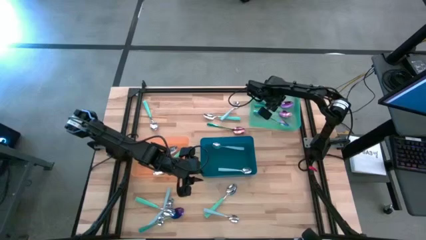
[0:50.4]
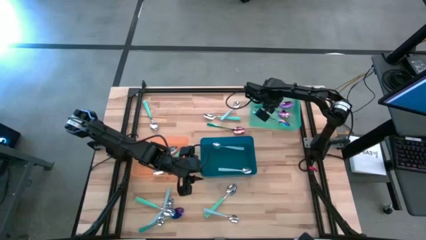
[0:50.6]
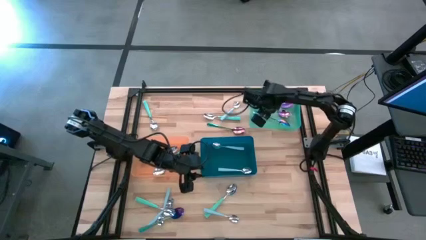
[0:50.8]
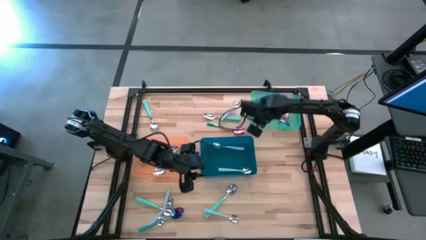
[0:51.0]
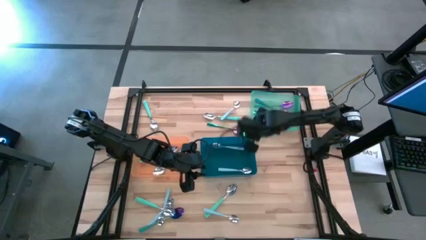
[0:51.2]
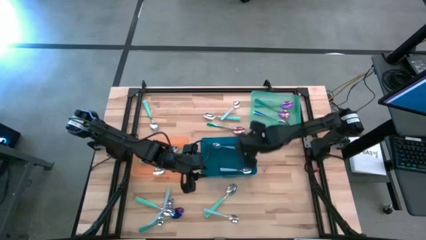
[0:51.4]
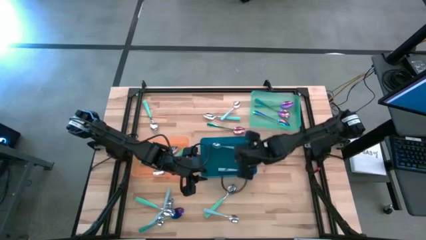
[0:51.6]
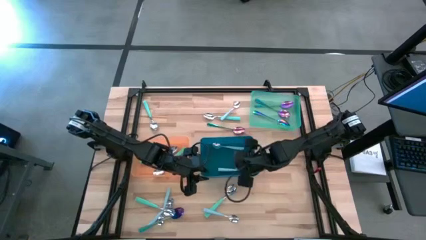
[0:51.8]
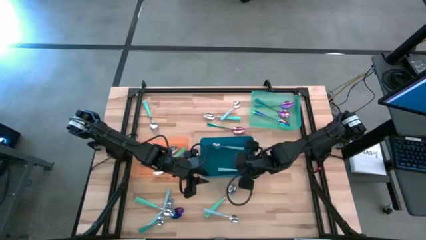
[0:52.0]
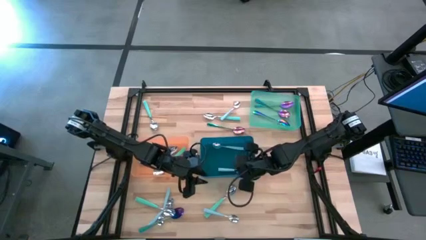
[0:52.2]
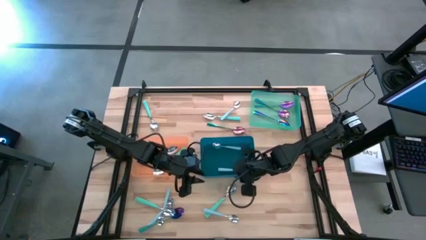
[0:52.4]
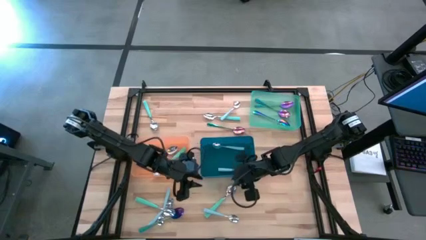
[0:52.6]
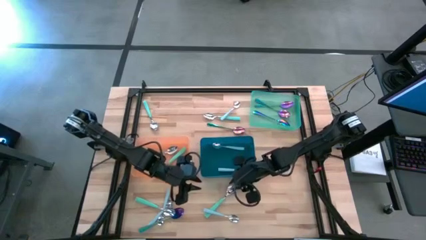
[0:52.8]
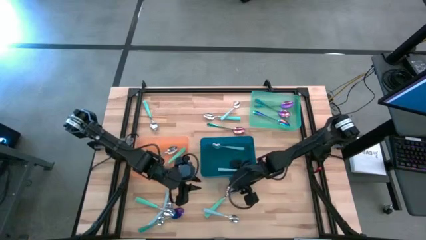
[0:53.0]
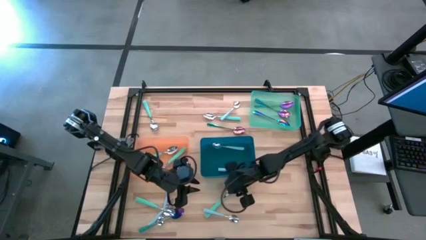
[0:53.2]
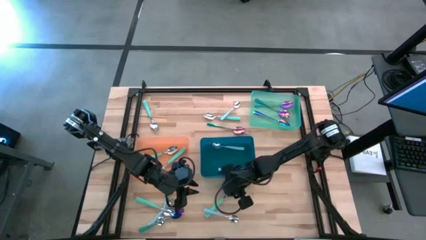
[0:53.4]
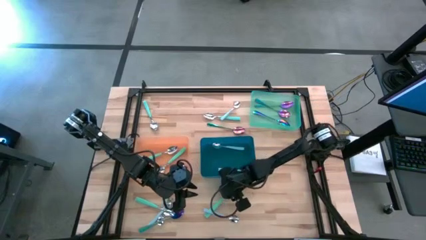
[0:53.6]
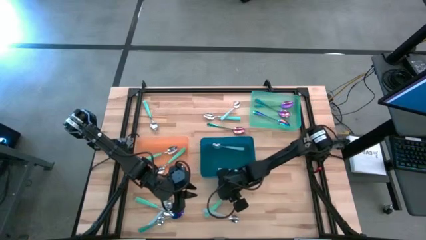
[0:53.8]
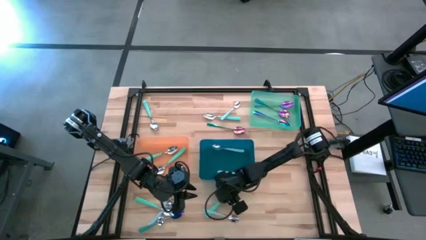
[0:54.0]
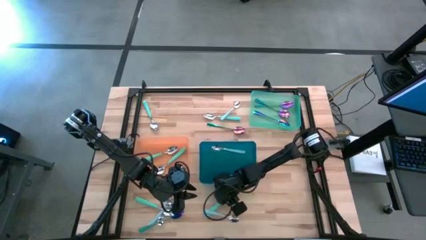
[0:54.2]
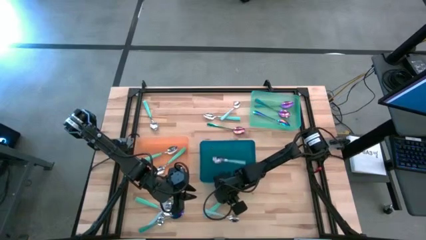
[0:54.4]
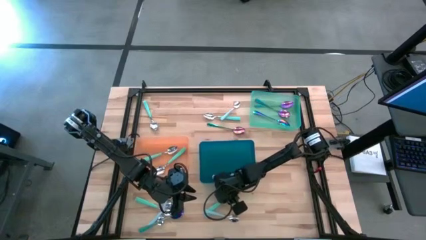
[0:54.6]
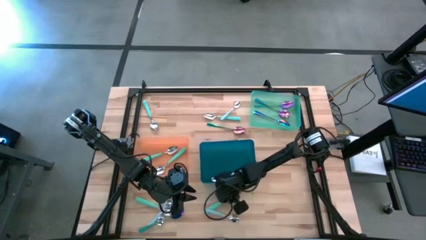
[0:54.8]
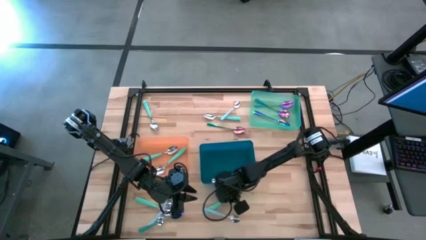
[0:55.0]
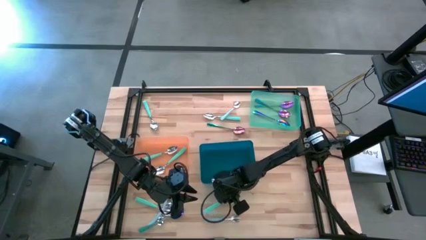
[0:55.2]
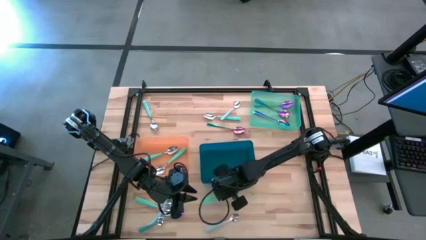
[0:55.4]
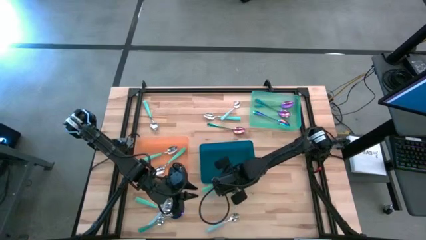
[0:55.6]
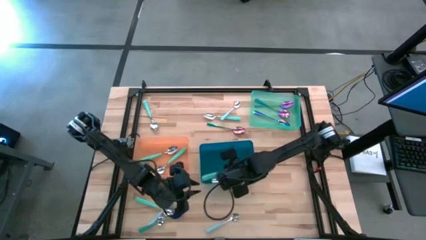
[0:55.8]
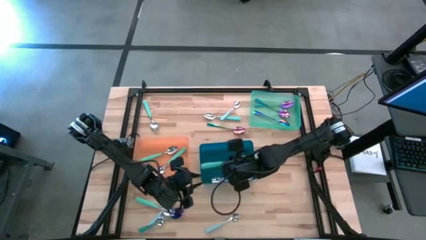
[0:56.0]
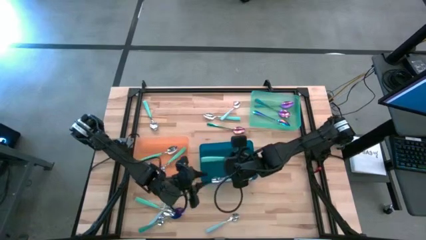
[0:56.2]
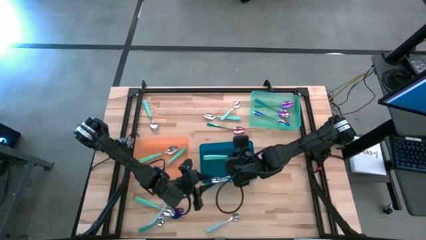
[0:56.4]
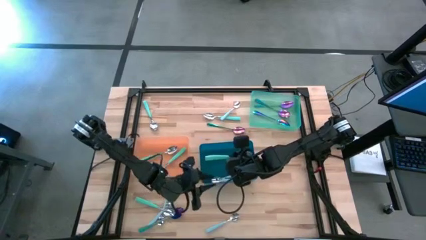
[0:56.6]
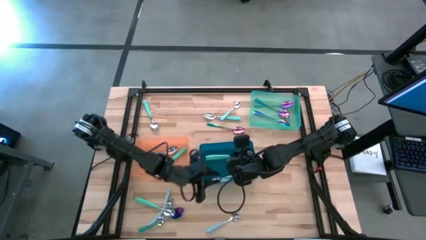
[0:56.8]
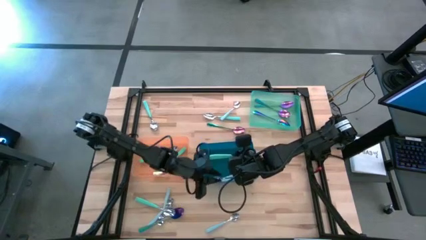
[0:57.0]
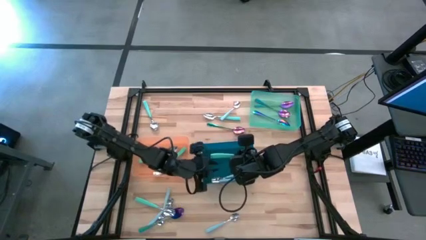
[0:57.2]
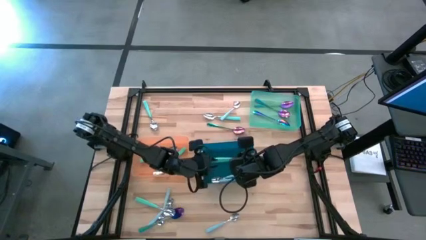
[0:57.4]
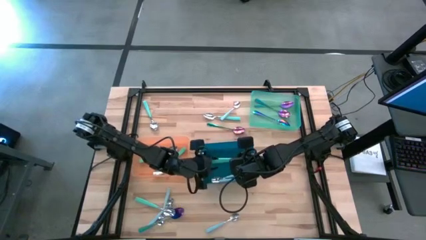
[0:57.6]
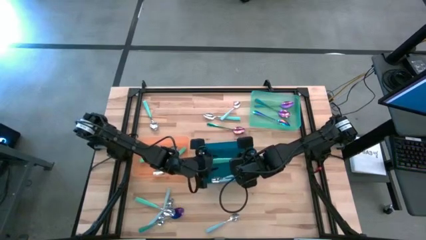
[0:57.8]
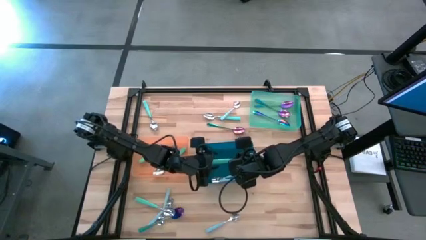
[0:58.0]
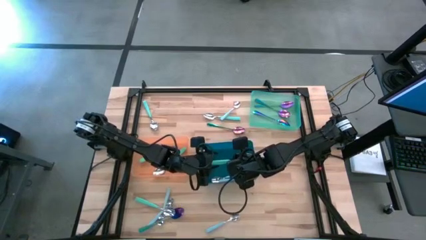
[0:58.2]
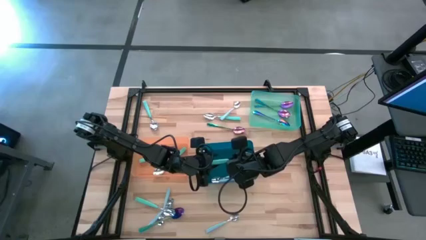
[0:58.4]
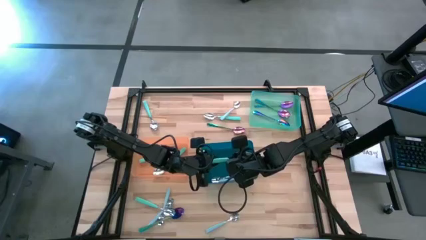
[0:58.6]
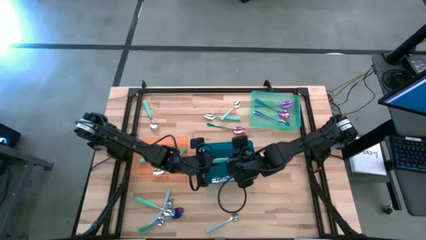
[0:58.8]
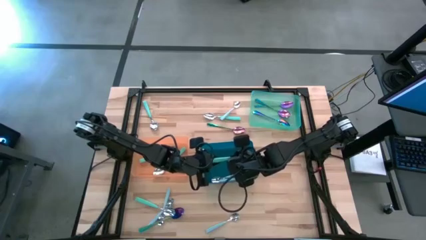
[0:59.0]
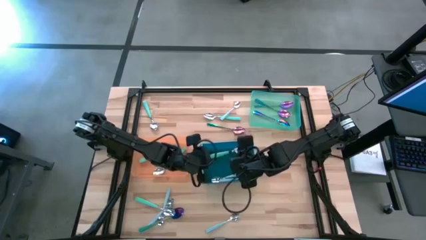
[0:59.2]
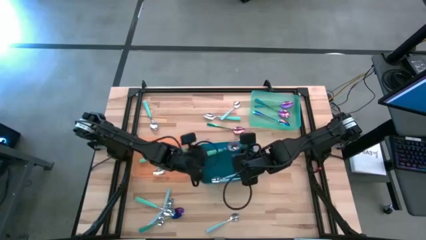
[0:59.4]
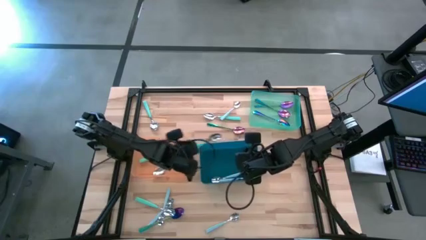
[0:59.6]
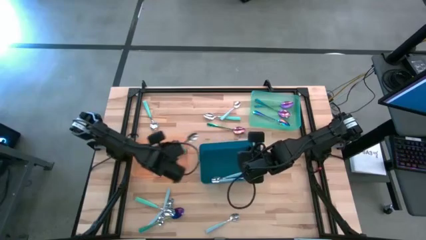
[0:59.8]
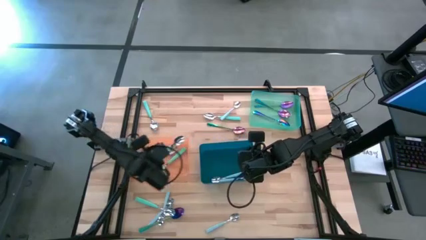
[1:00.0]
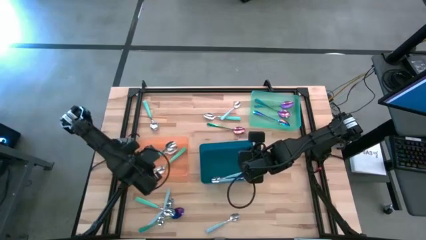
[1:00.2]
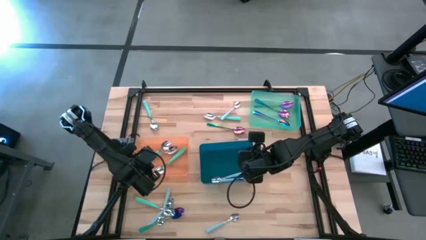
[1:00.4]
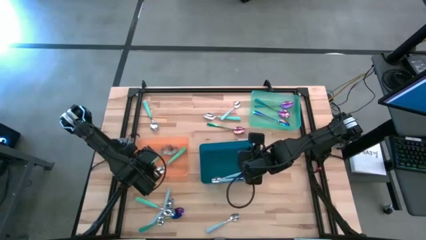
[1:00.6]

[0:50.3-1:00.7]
Task: Sort silverware by color (type)
Put the light green spoon into the orange bin

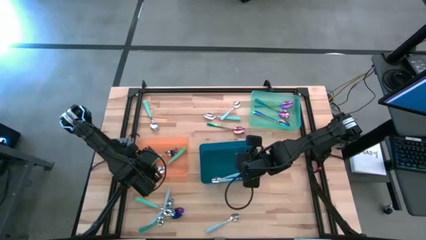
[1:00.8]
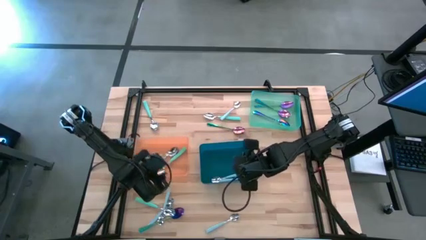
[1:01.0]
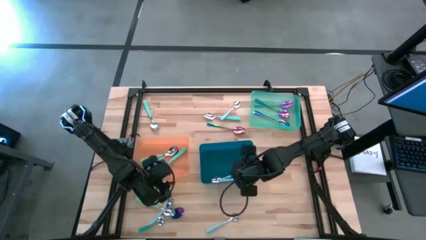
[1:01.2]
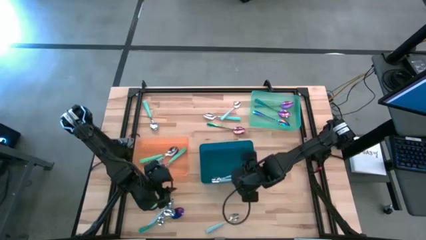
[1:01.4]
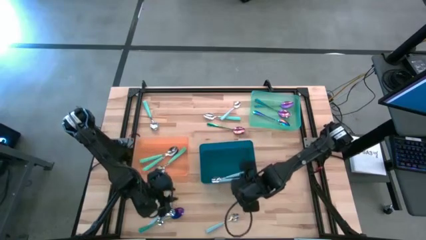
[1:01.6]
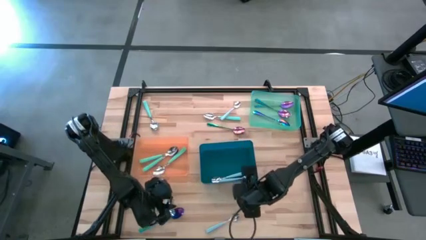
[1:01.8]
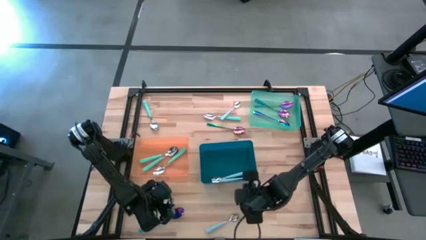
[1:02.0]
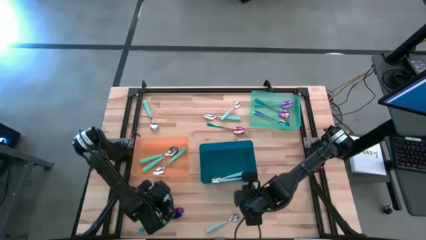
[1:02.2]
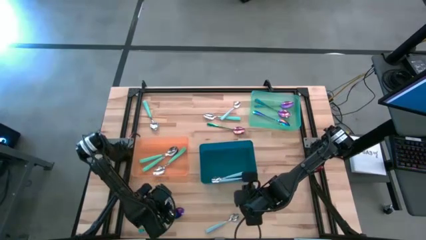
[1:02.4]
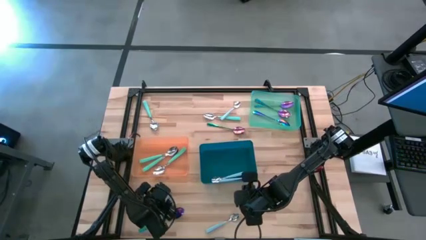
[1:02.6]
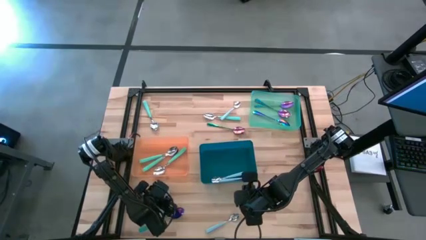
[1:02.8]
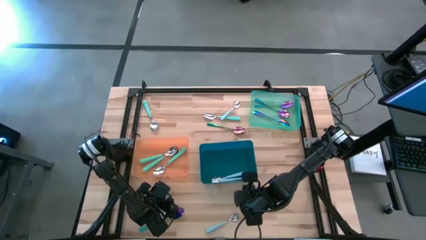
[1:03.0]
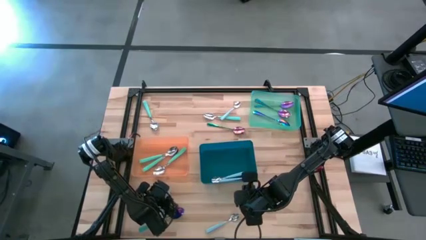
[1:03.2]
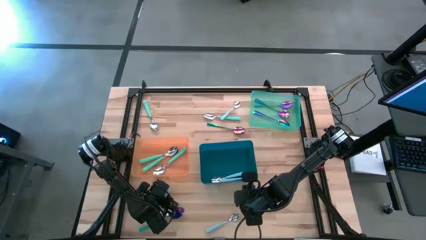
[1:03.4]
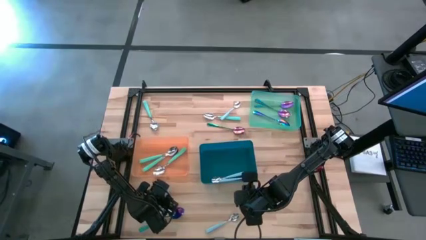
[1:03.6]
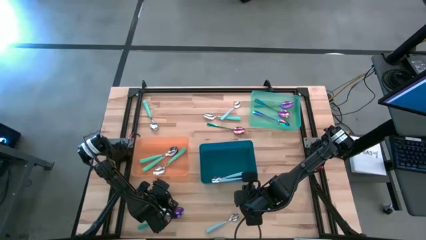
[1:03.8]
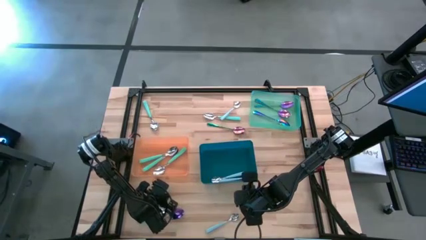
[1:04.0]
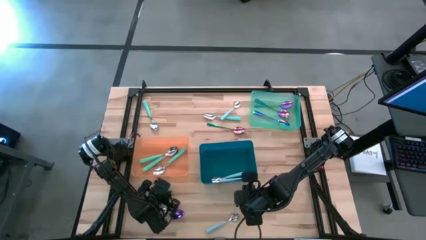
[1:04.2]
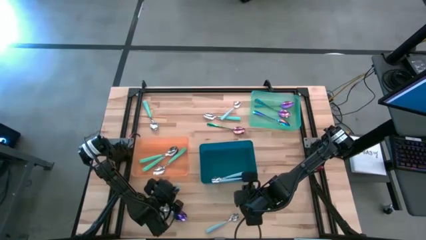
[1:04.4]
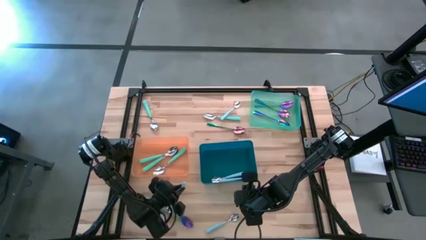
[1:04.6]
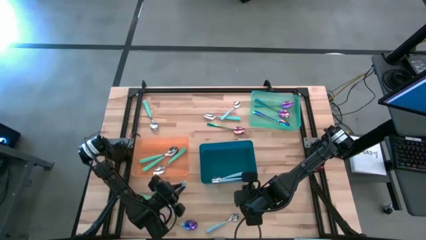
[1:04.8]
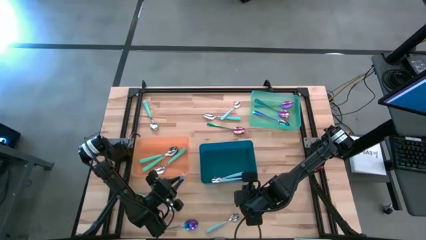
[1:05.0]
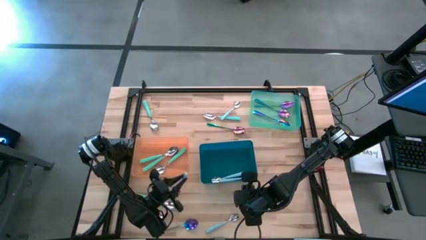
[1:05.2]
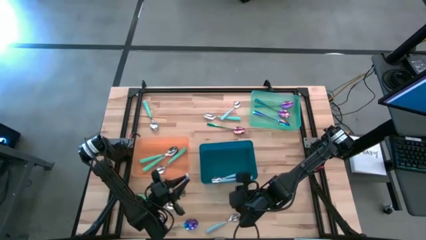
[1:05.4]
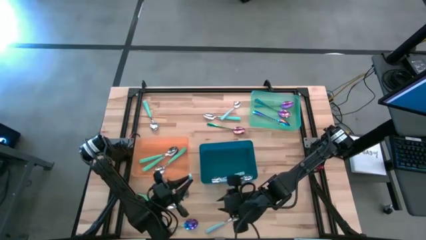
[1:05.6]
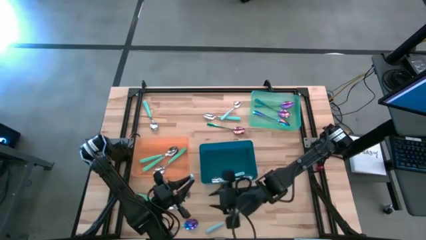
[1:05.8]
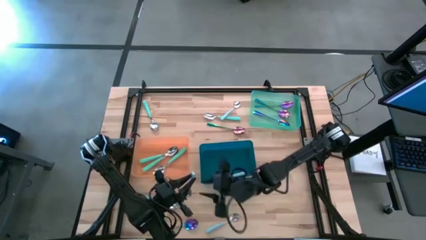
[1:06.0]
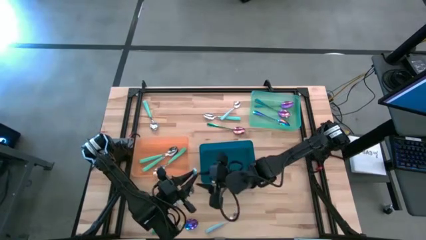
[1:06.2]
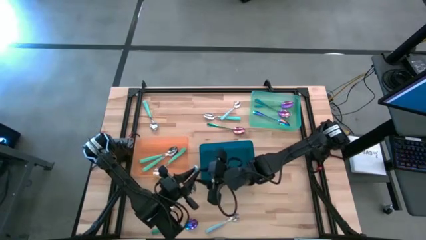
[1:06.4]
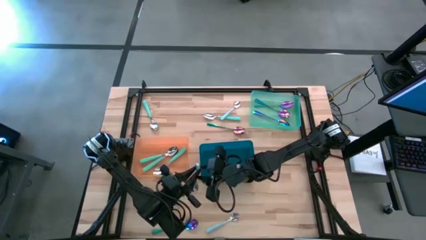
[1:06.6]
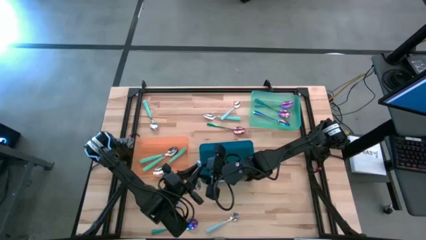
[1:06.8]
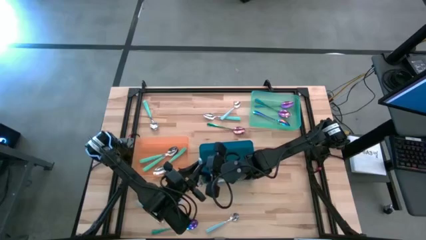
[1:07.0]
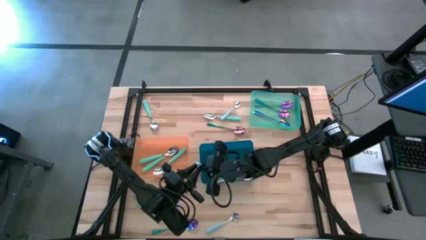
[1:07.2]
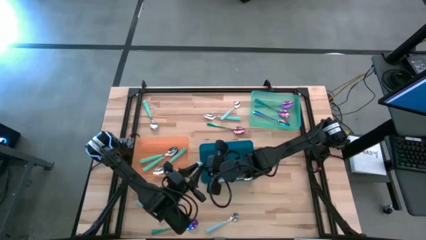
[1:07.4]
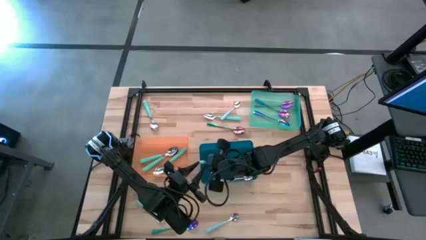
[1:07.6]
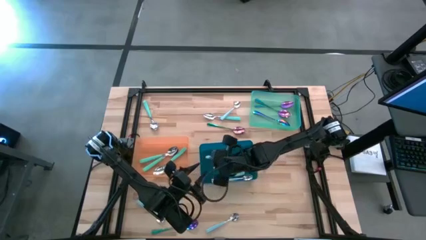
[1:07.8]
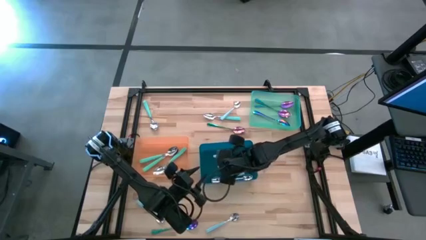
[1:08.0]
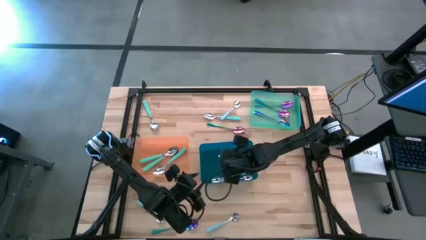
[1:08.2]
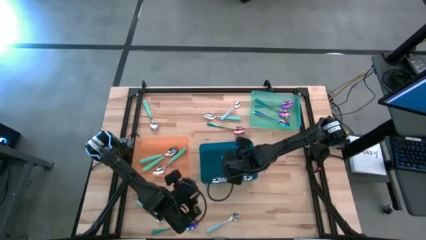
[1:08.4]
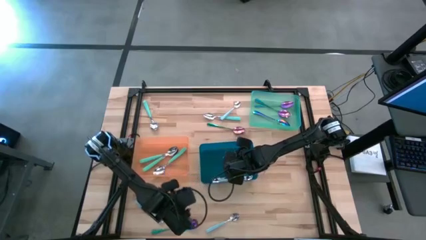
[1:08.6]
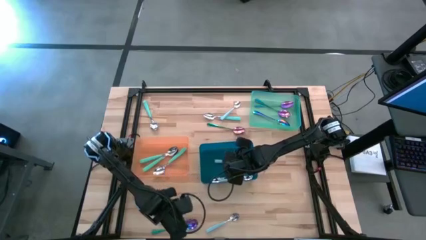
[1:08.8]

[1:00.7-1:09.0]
Put the light blue spoon into the blue bin
